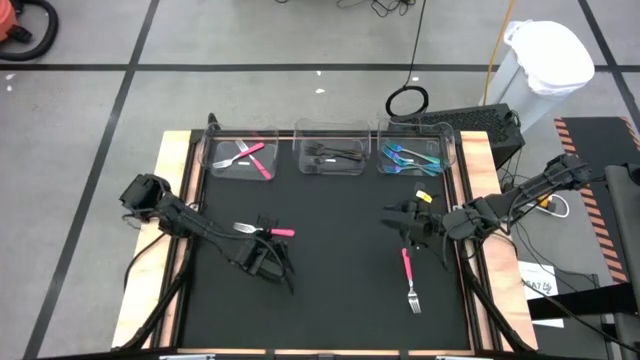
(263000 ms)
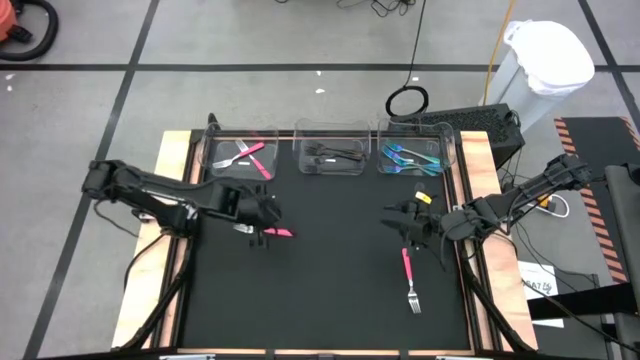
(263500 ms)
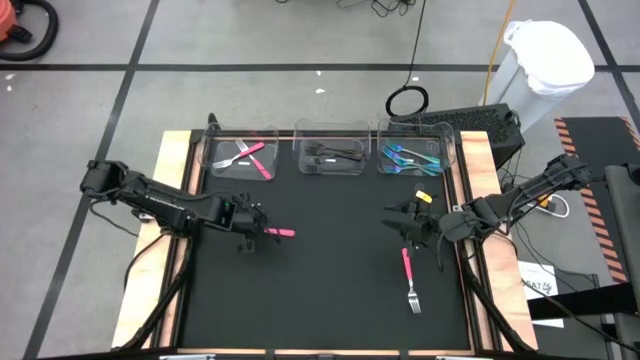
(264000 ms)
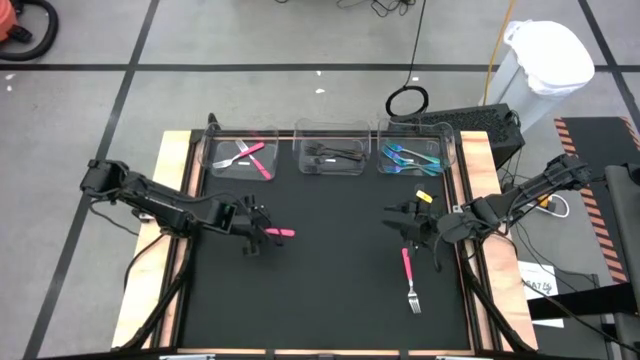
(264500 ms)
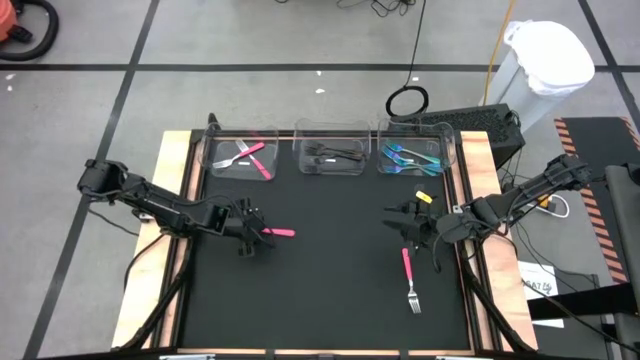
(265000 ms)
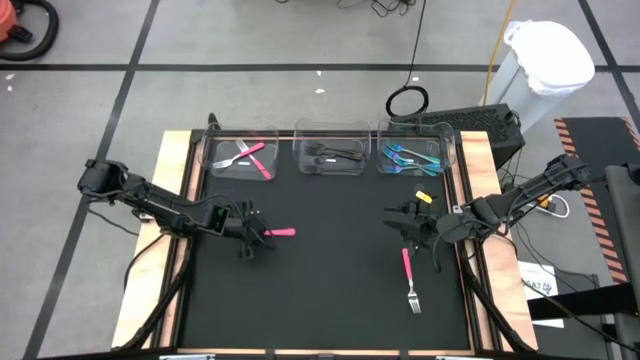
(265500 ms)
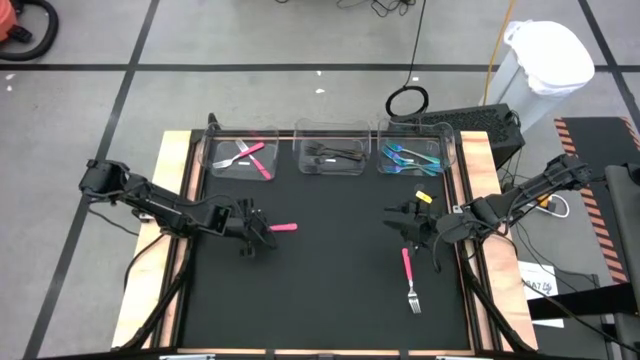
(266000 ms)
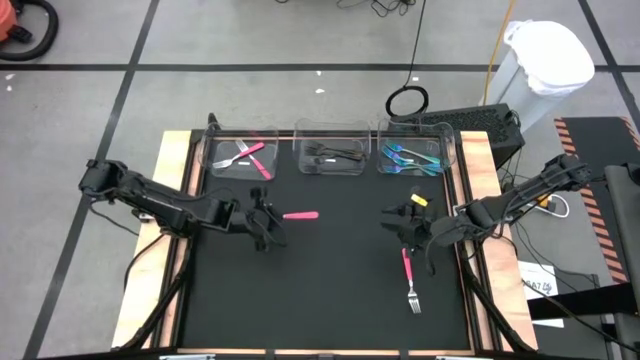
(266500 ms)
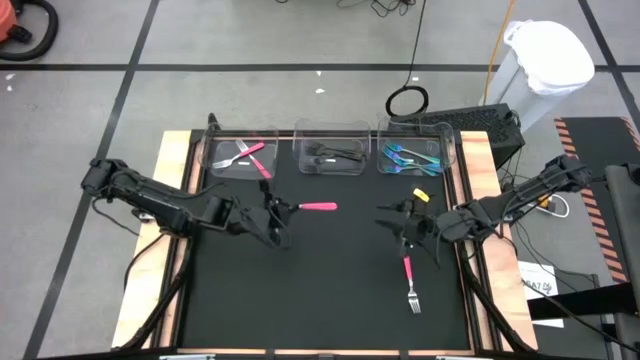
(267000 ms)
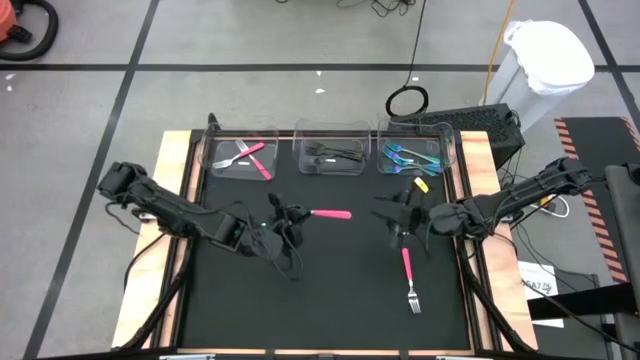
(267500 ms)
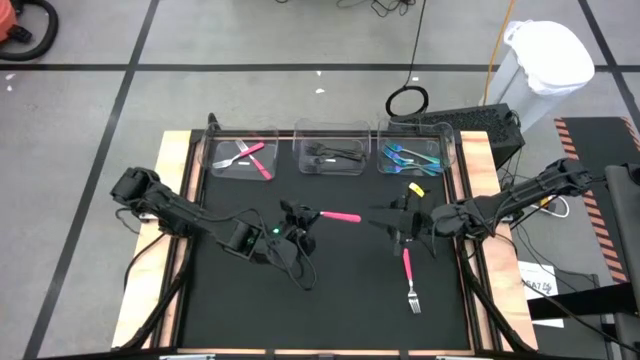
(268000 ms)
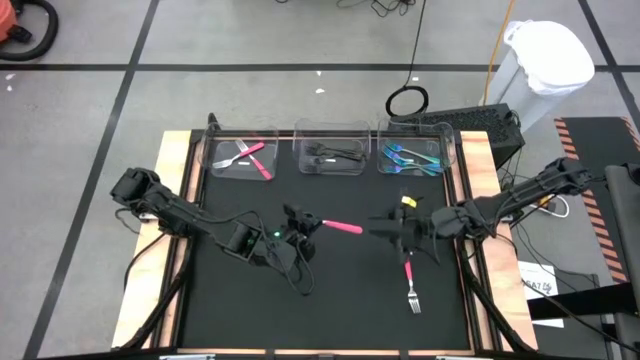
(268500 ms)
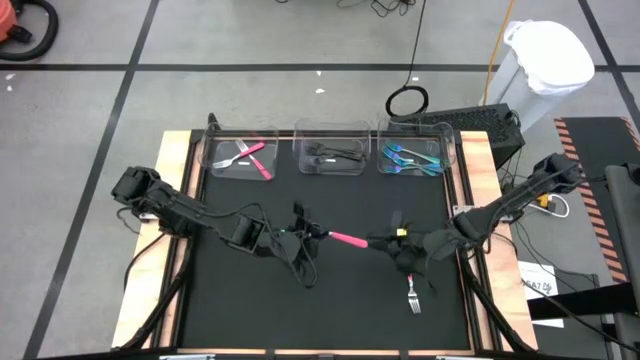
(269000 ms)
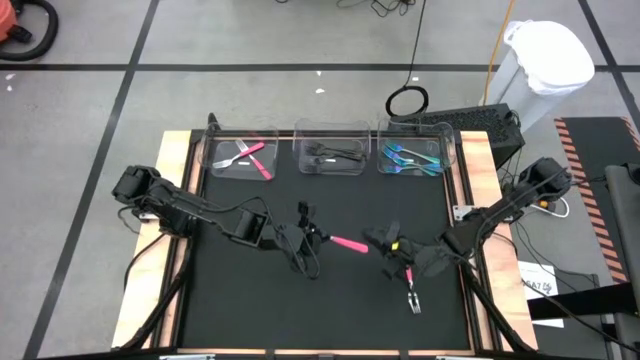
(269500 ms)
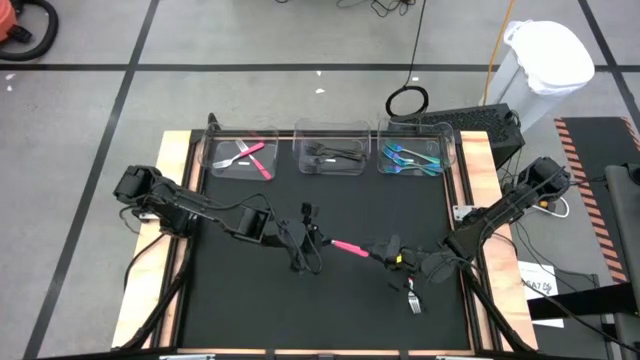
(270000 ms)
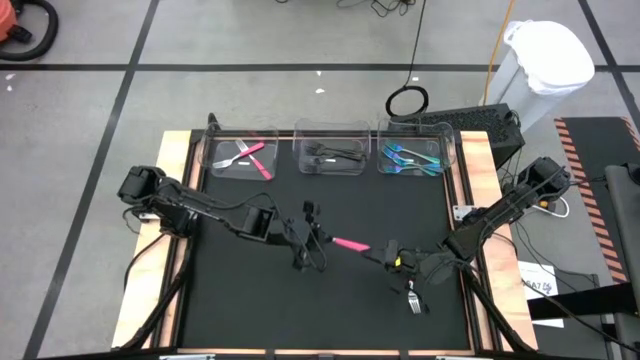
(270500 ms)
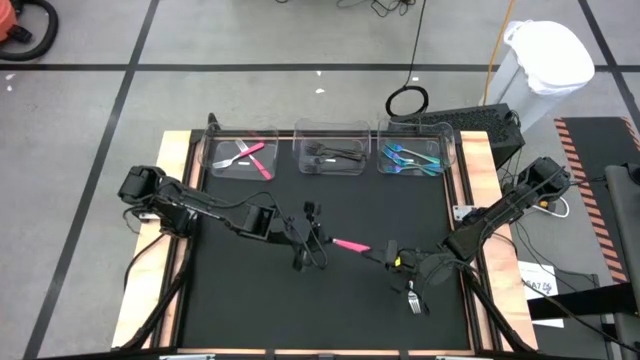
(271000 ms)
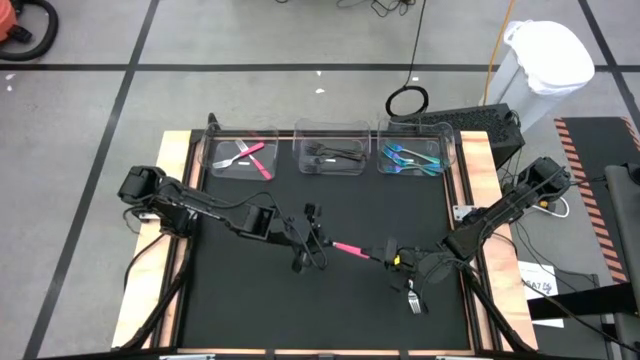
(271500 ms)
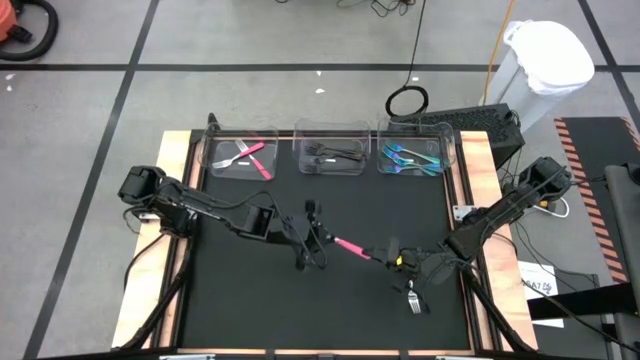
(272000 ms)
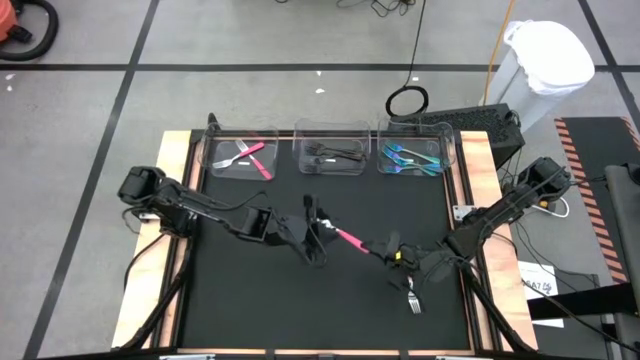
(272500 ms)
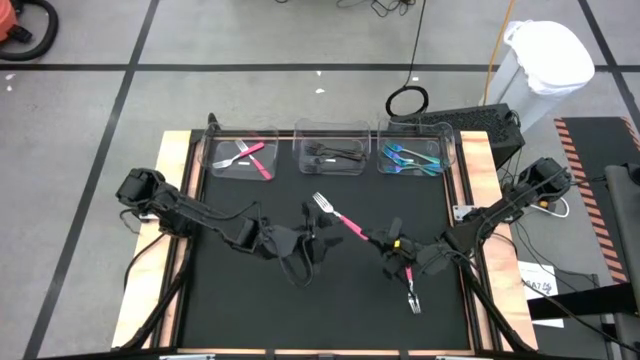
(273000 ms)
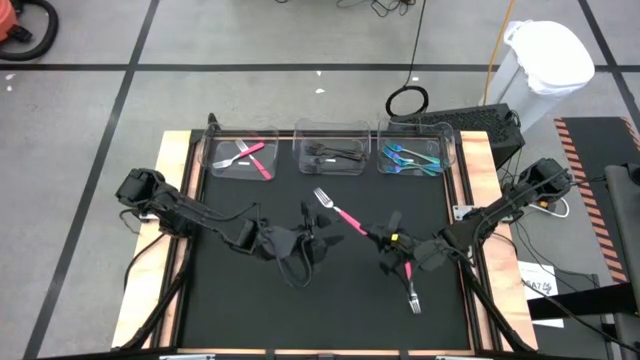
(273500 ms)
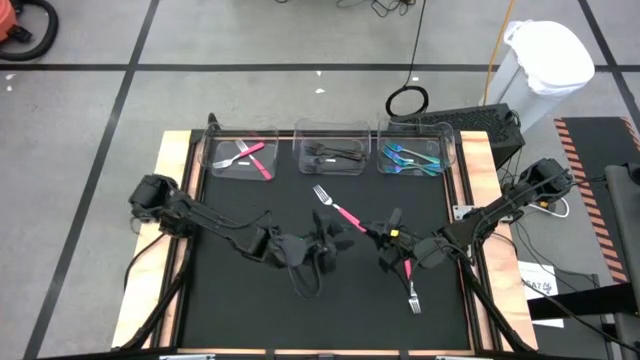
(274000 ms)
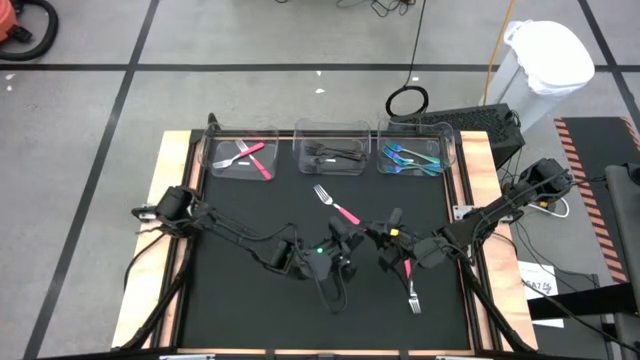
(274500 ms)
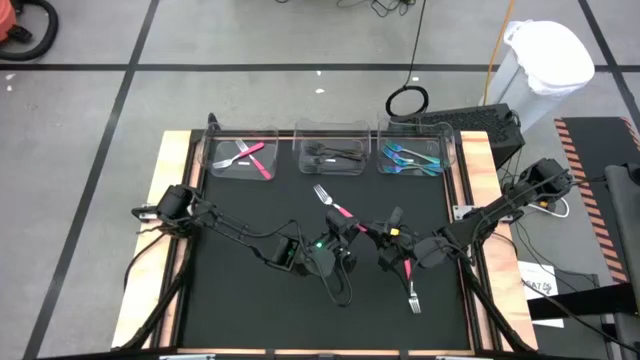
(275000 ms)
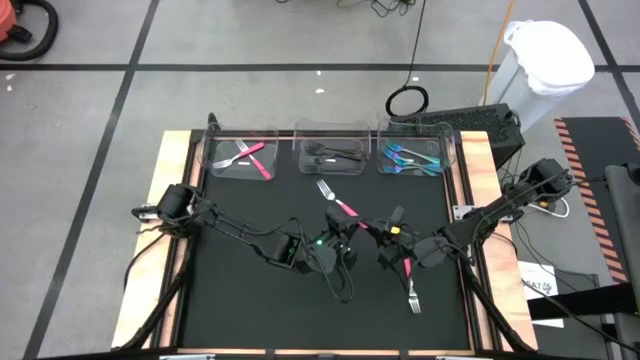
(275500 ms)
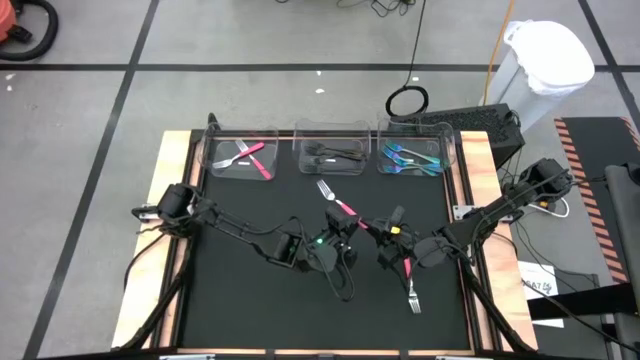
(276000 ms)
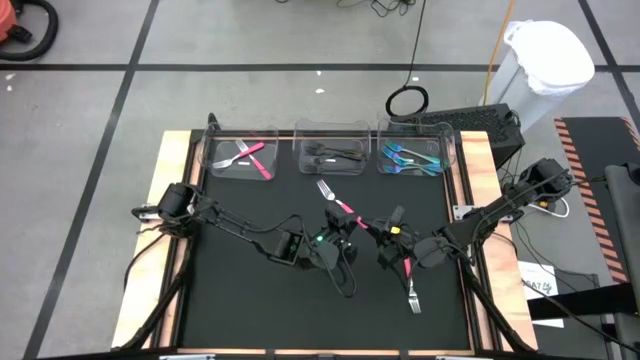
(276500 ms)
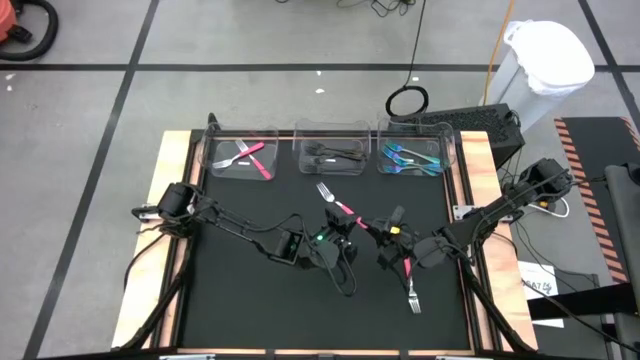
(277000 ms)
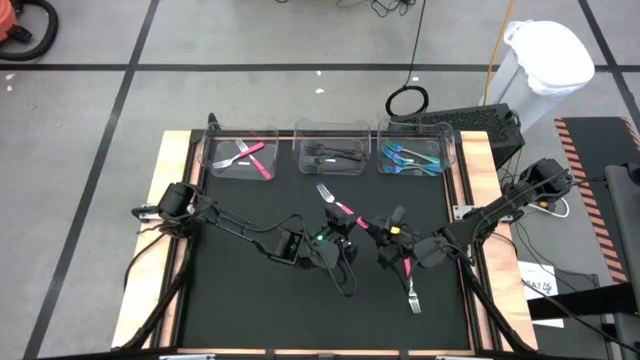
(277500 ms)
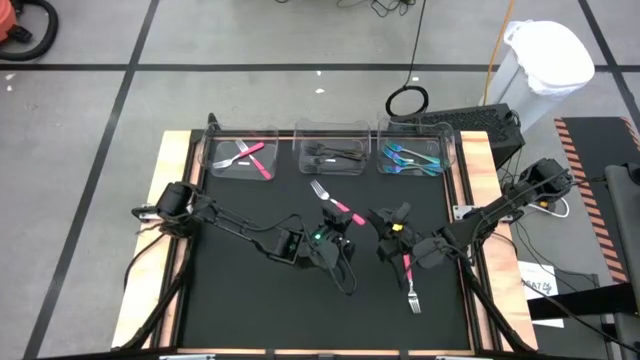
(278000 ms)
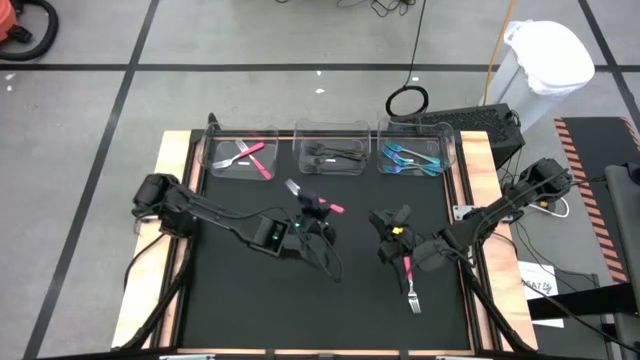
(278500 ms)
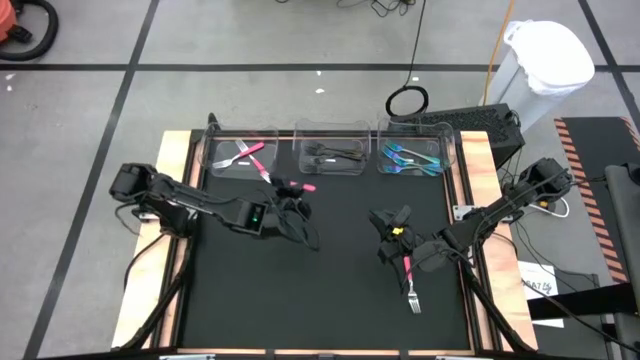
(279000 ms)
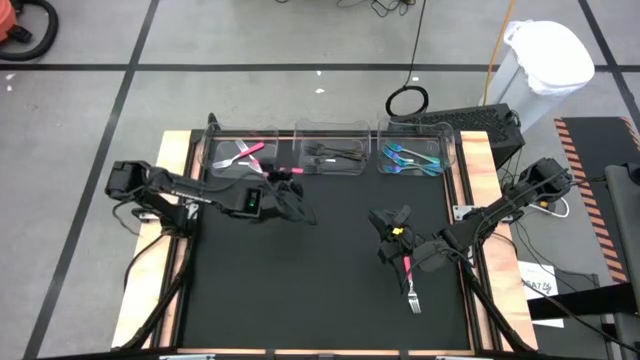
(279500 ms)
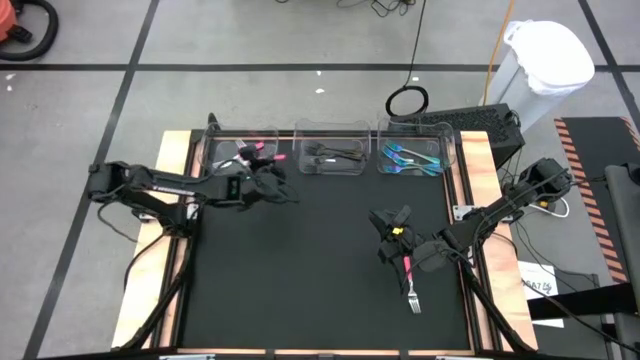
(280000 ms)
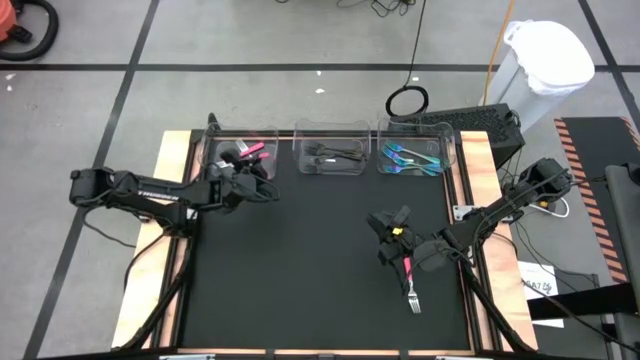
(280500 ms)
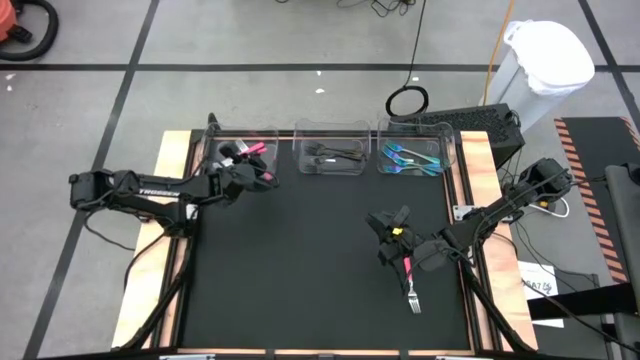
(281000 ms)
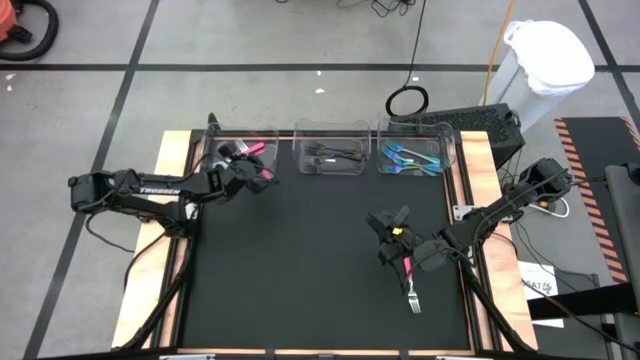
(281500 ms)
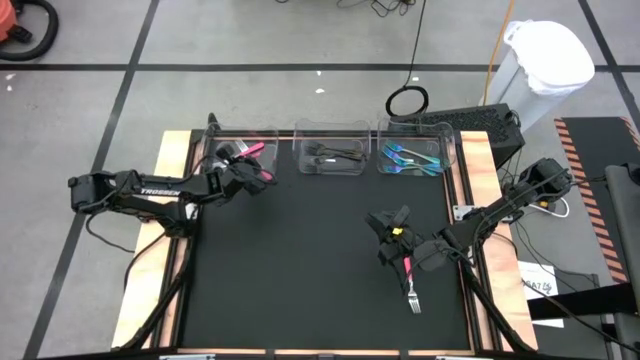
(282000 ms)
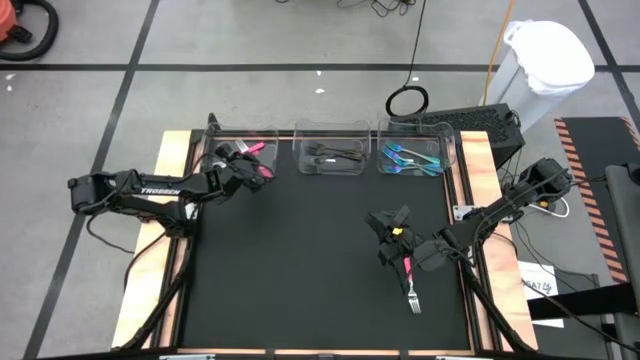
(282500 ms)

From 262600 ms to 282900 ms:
Task: Sort silverware by color (type)
Put the pink fork into the left transparent bin

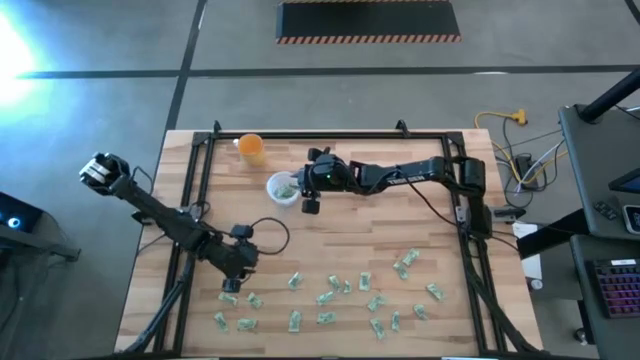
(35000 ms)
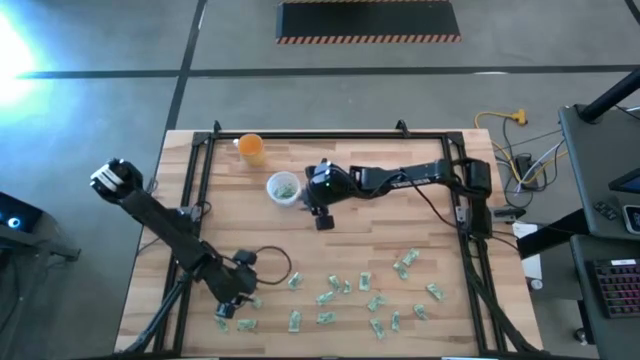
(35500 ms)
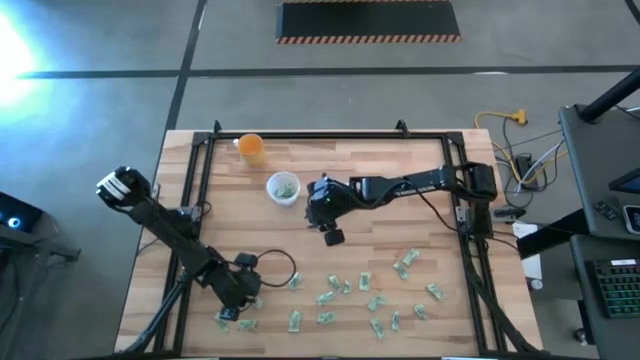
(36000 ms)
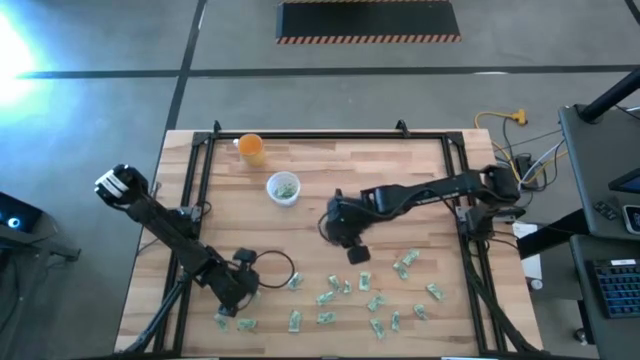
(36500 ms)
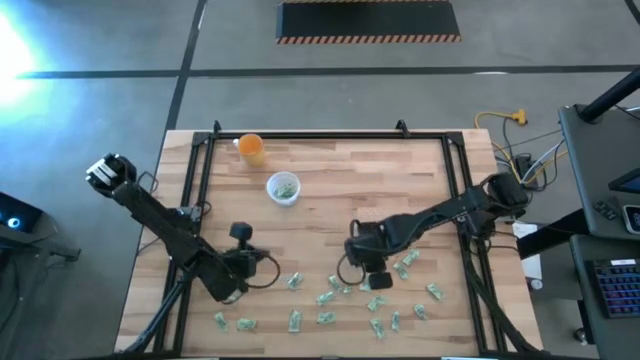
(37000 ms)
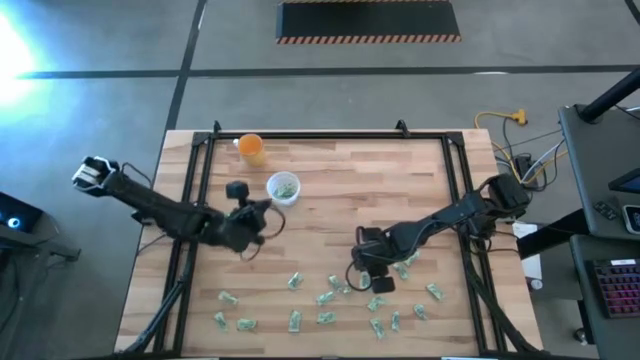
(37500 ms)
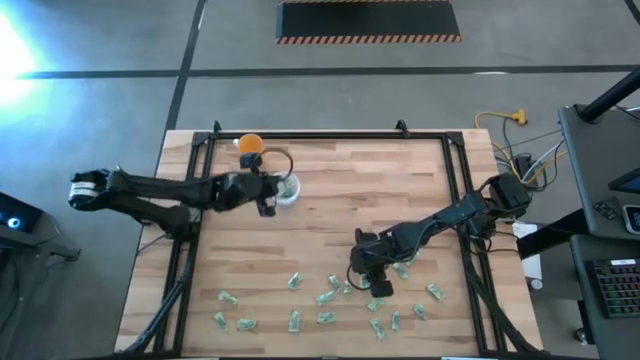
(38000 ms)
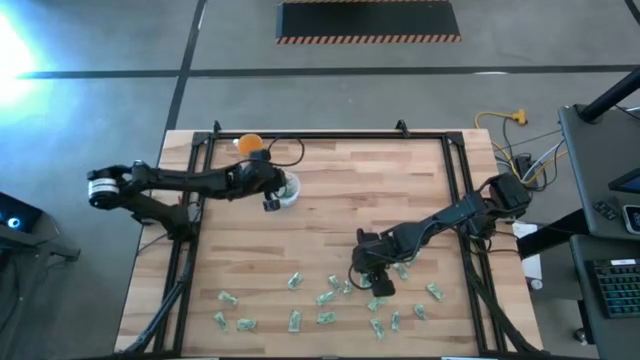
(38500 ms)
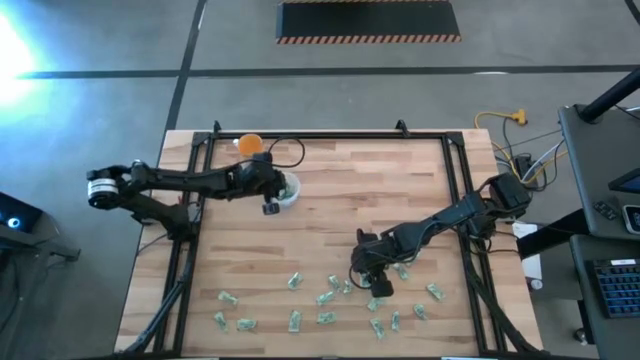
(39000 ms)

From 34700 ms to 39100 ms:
Task: Pick and place Stevia / Truvia into bins
Put the stevia packet into the transparent container
